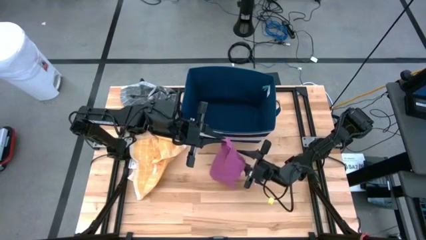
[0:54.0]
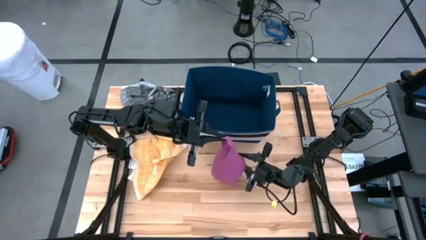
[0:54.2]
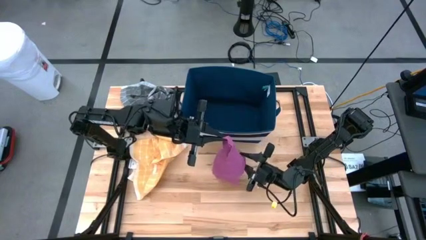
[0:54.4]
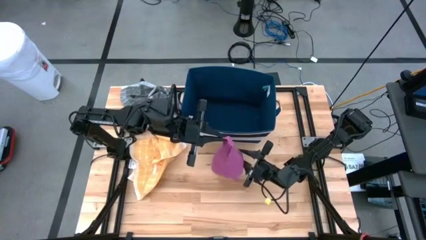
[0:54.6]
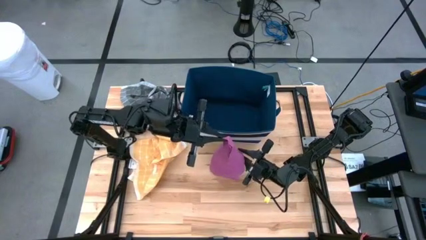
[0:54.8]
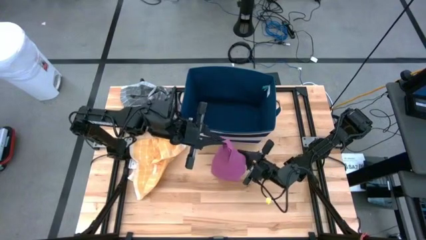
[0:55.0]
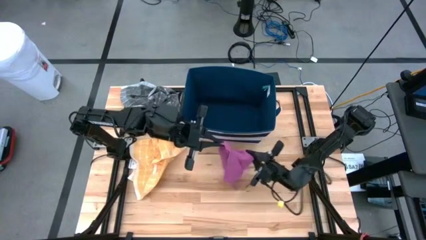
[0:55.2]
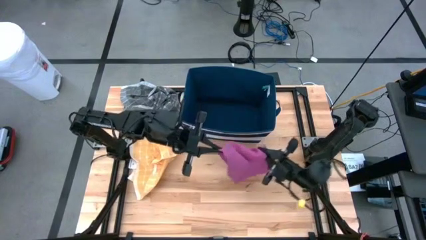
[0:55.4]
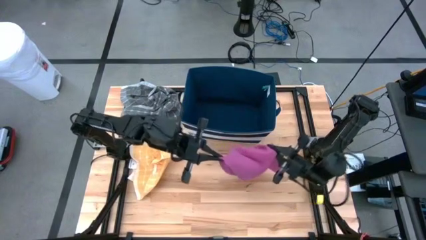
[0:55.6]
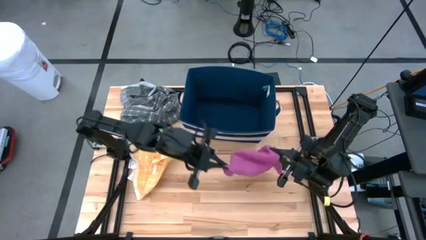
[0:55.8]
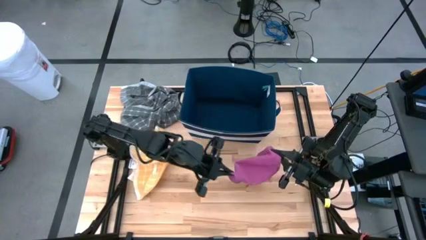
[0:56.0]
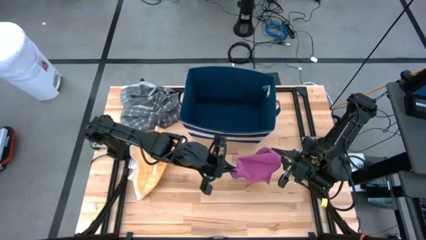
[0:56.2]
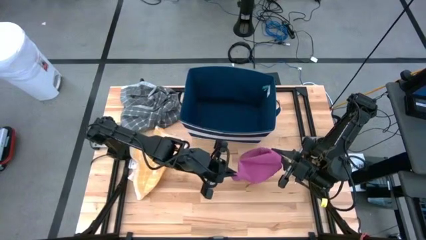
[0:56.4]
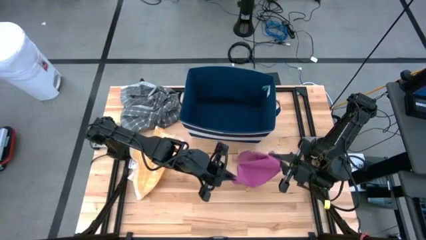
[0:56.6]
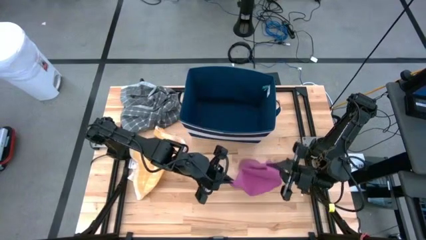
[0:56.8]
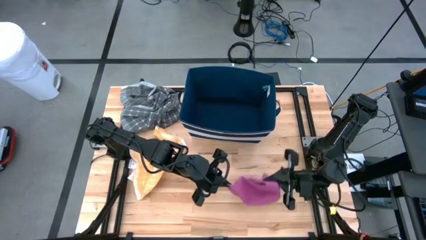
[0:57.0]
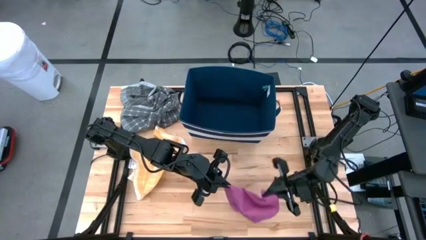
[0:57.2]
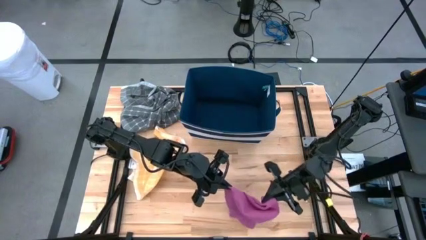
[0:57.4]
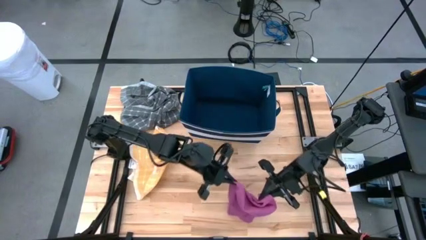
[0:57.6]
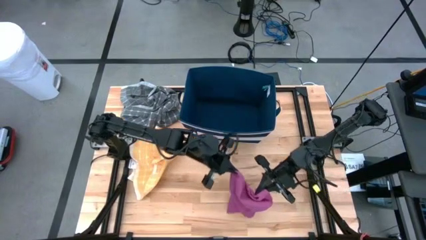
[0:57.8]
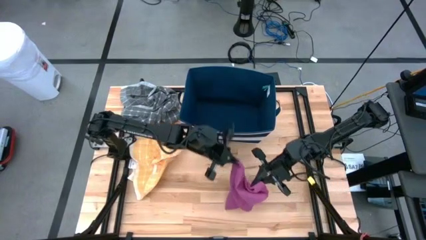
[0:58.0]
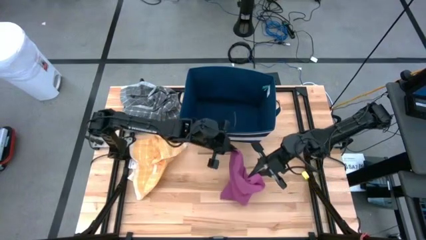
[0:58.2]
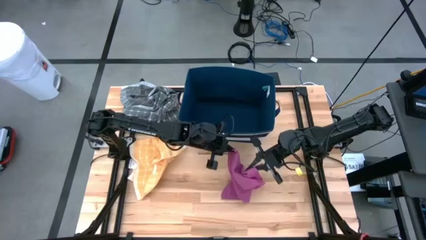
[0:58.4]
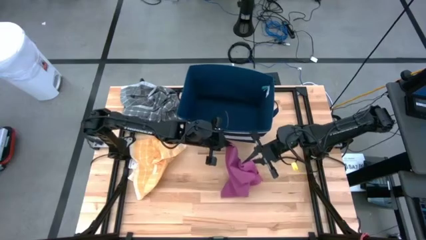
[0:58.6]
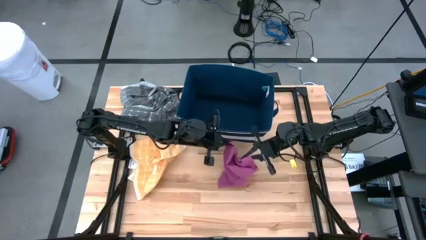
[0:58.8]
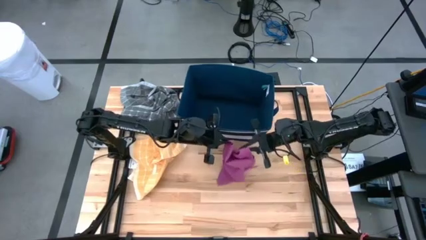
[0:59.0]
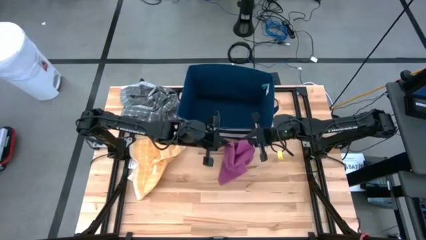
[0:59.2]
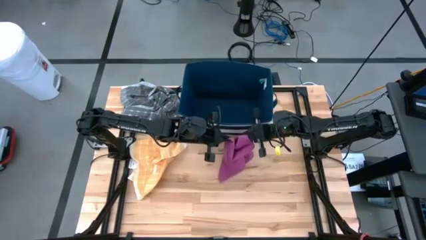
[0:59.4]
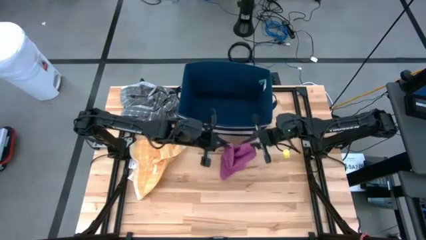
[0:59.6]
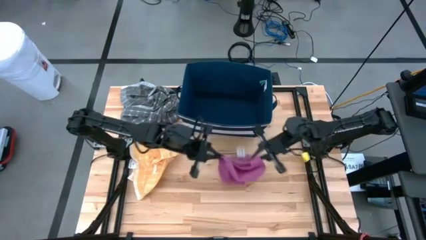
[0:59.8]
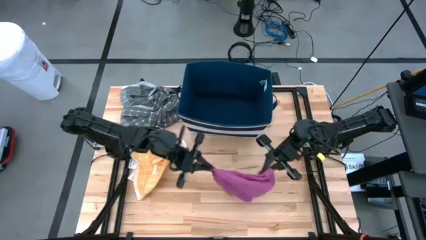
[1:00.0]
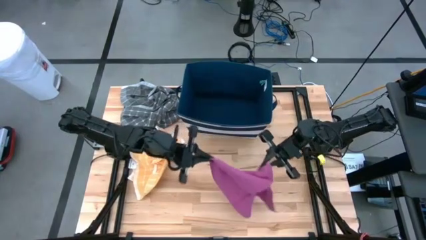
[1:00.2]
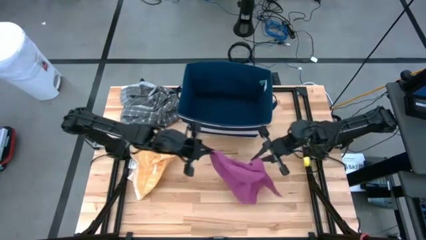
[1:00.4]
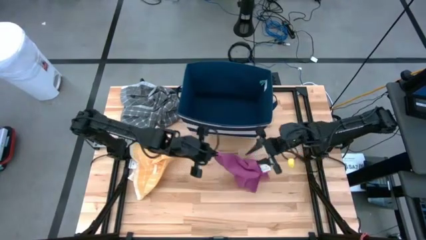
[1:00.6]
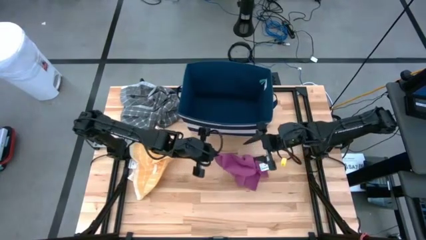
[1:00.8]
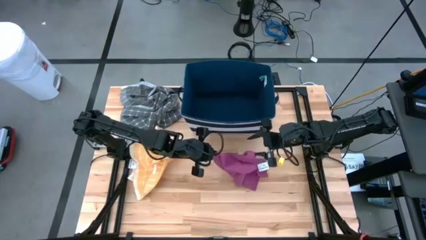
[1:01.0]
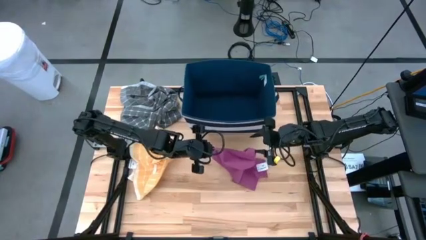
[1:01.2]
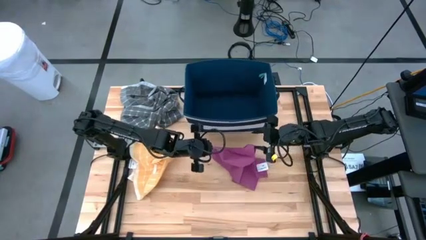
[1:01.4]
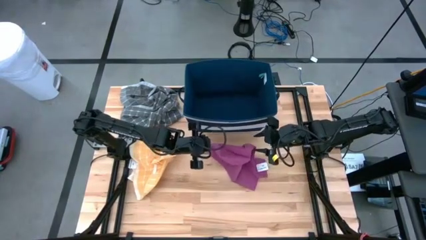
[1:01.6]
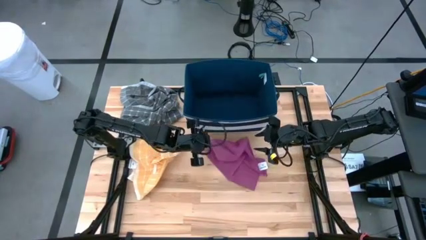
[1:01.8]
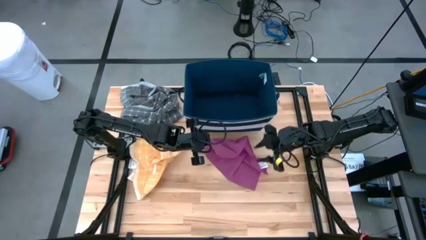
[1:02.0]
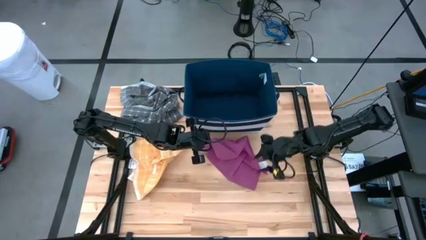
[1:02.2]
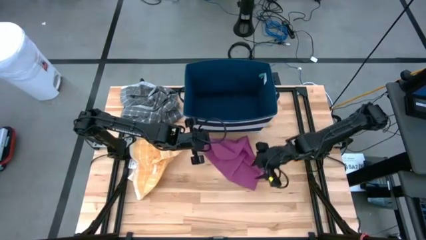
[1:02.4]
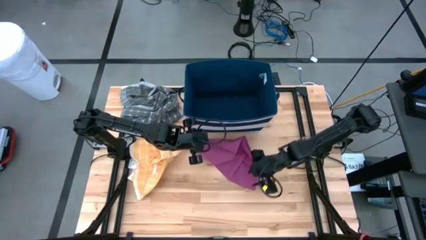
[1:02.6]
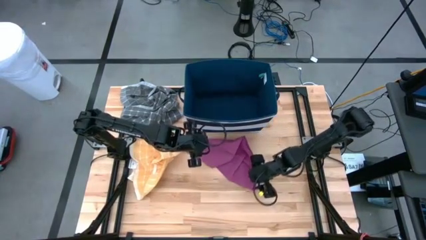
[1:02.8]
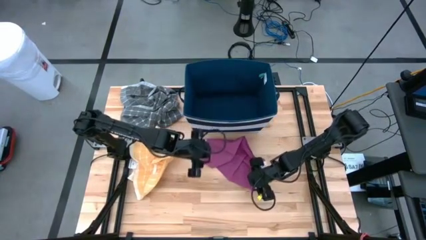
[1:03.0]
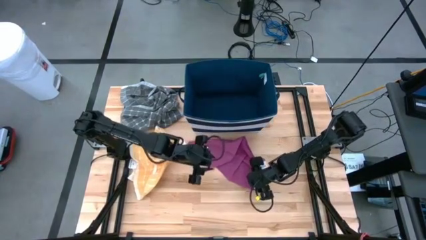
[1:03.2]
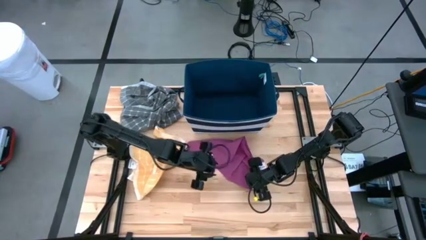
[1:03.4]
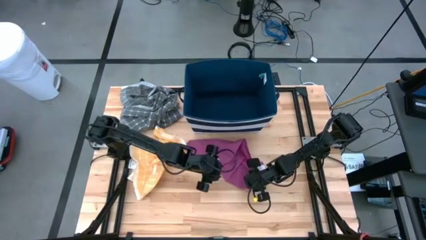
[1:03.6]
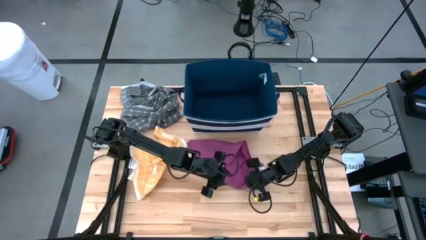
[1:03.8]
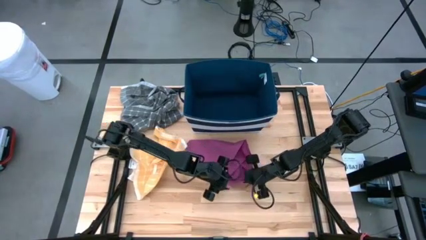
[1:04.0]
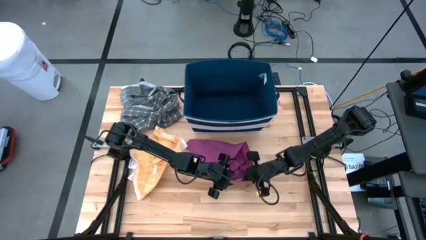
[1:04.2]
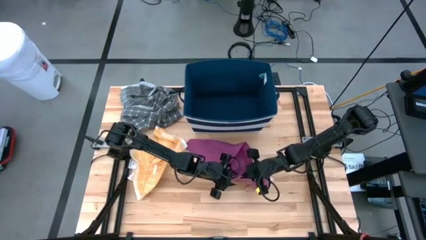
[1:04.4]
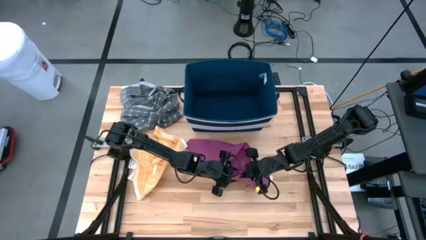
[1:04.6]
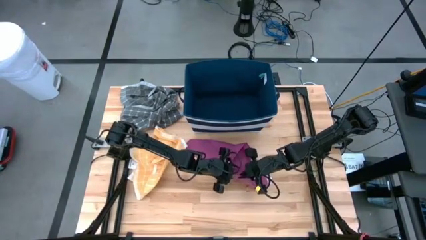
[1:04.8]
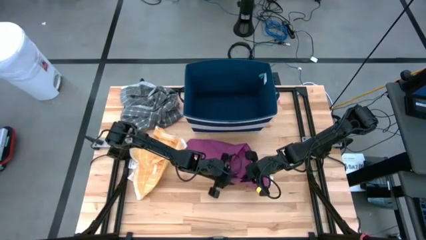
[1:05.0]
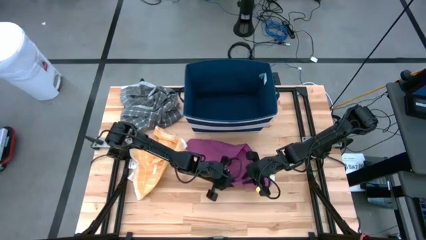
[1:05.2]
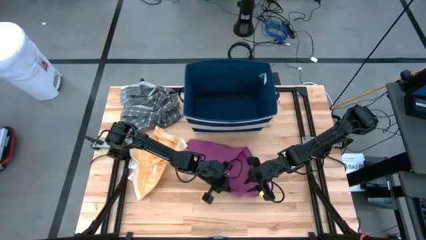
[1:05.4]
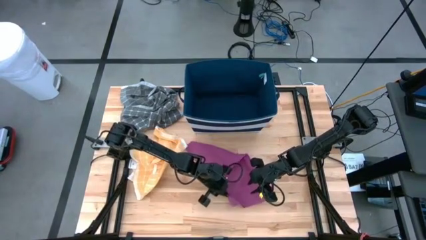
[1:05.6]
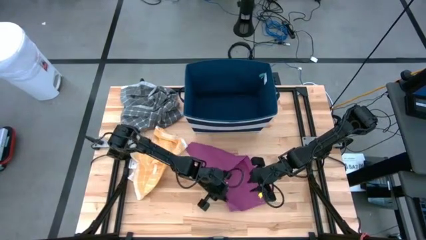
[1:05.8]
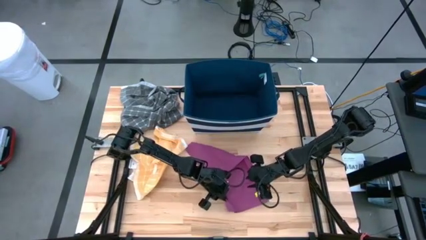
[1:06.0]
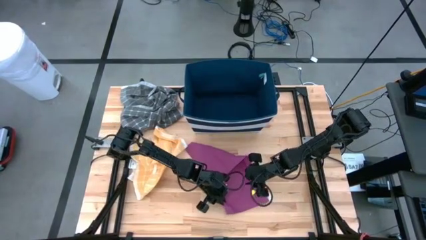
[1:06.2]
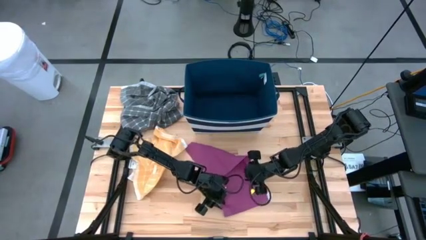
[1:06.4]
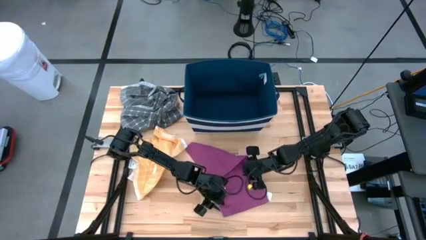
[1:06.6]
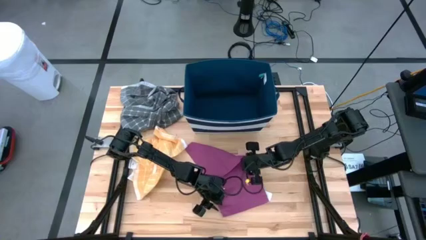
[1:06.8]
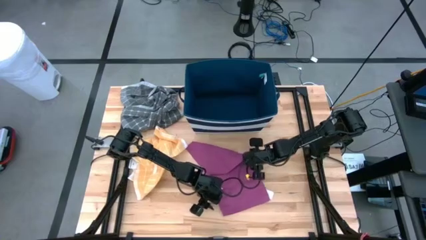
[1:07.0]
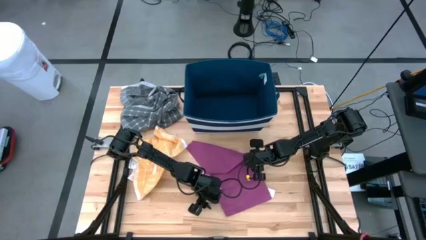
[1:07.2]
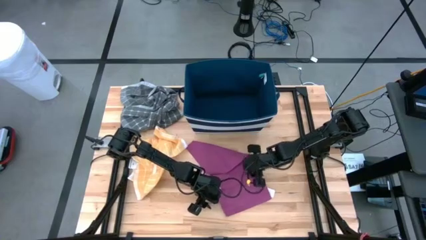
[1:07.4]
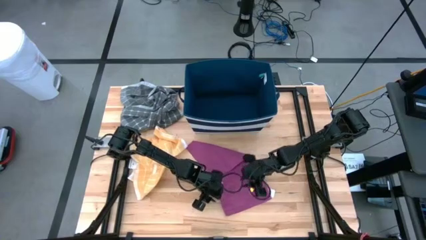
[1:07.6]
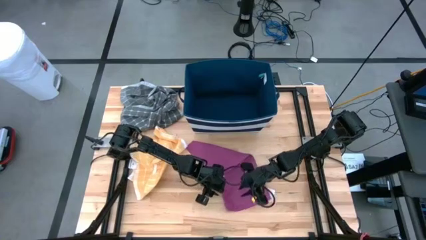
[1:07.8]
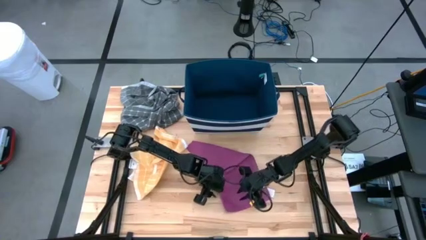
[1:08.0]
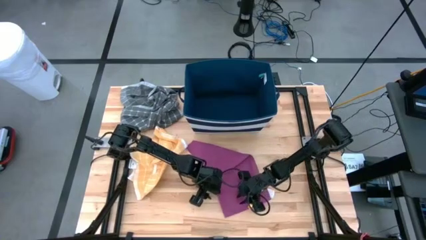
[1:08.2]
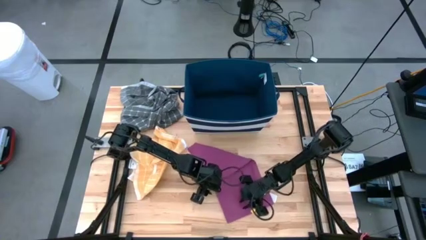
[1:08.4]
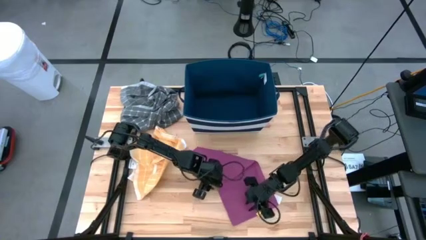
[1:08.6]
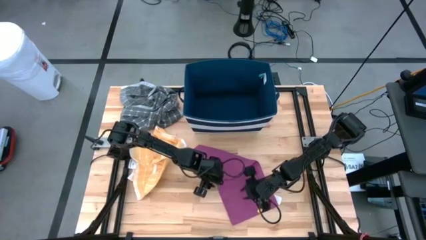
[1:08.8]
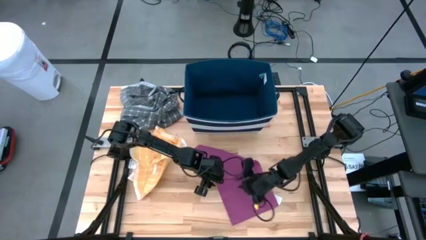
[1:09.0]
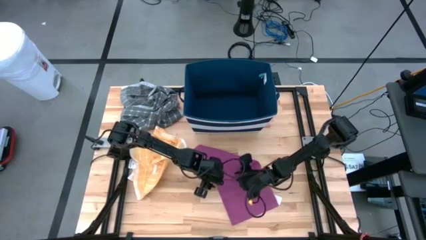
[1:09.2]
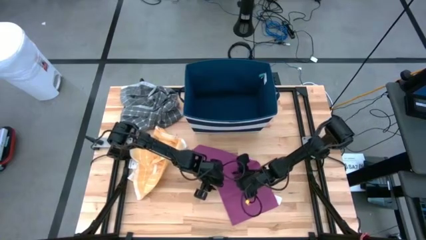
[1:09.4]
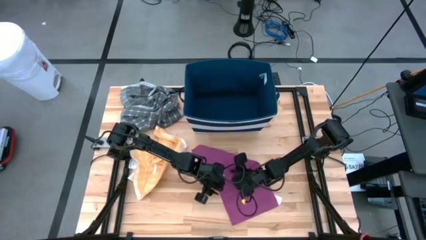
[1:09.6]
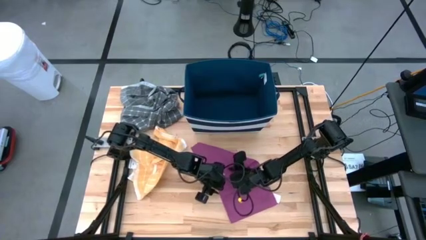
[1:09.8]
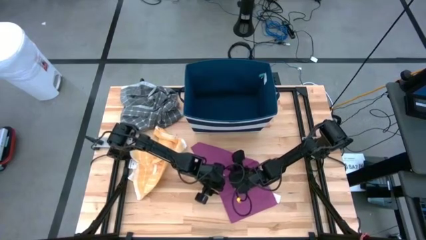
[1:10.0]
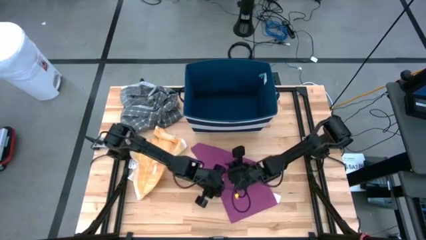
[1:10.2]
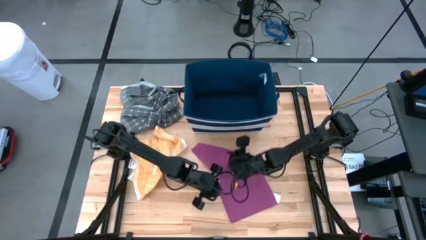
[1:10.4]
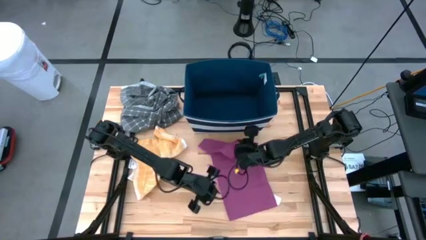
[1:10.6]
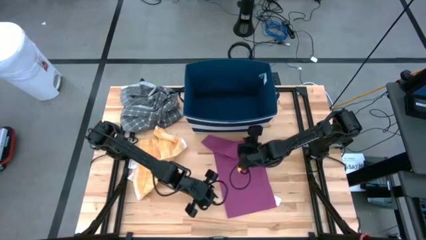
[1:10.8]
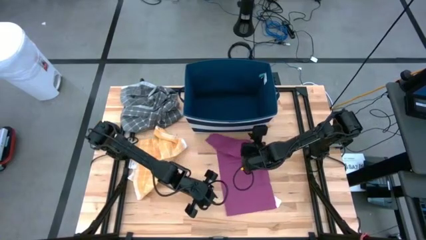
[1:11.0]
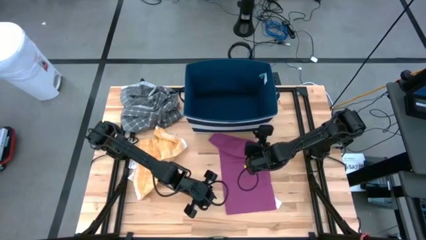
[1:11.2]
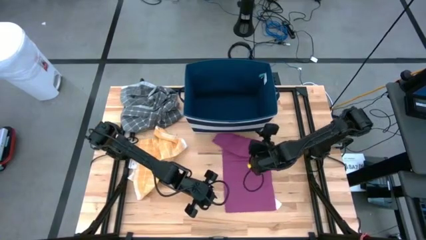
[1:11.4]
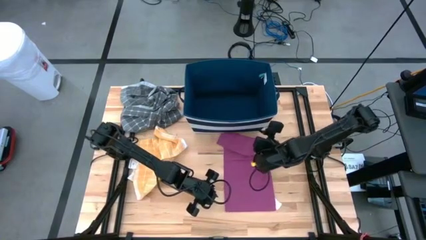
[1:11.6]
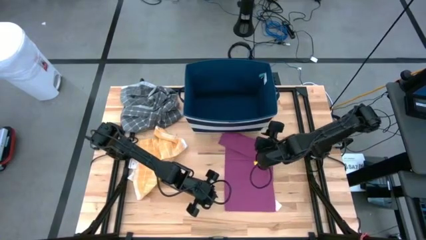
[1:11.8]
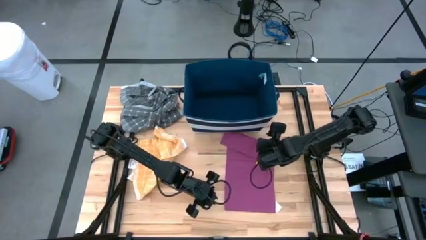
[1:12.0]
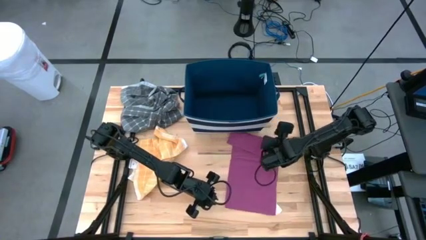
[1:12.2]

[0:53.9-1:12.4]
Task: Fold towel
Fold the purple towel
